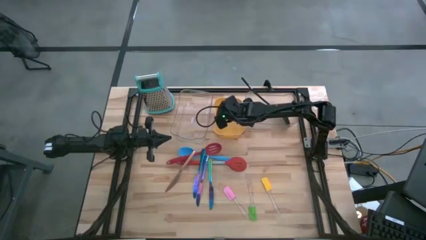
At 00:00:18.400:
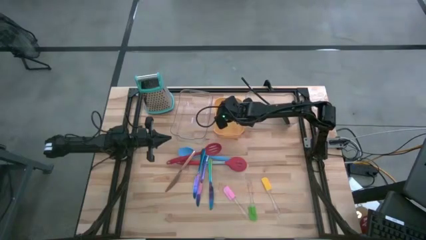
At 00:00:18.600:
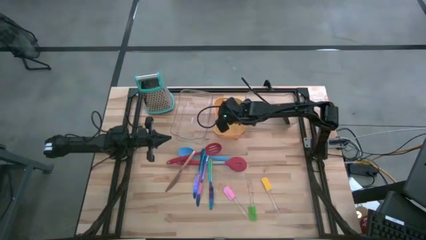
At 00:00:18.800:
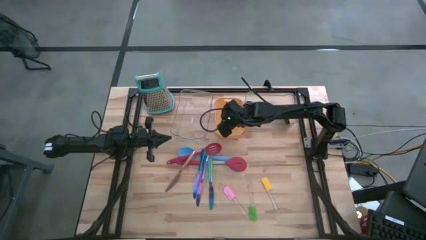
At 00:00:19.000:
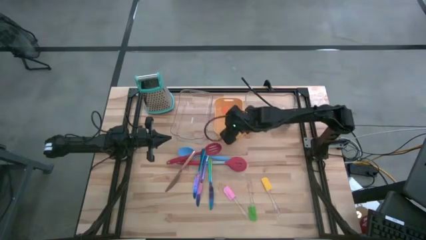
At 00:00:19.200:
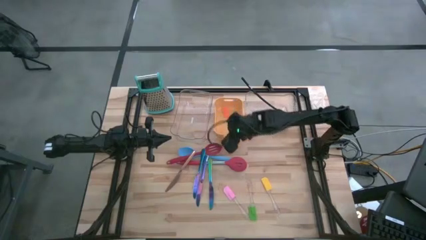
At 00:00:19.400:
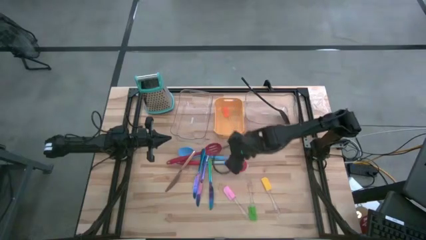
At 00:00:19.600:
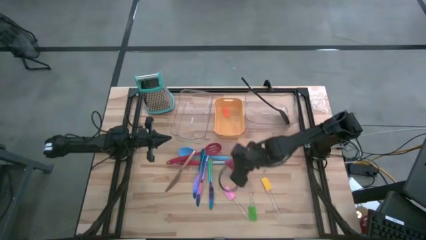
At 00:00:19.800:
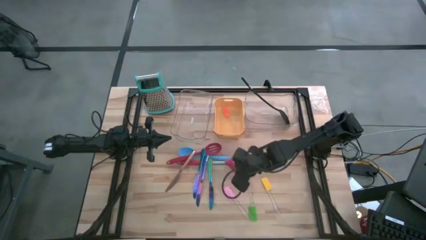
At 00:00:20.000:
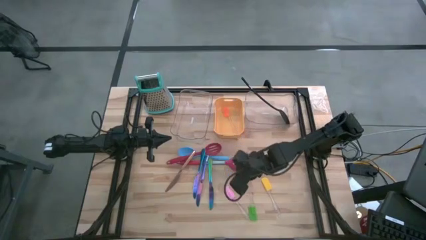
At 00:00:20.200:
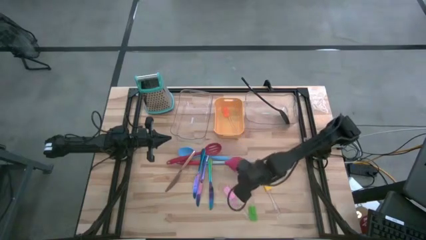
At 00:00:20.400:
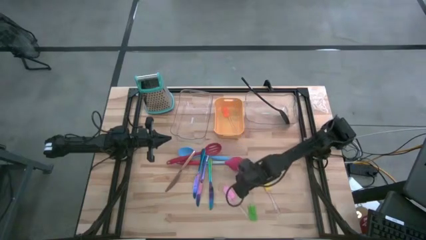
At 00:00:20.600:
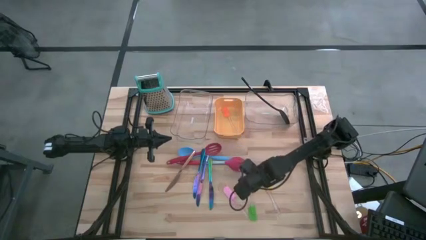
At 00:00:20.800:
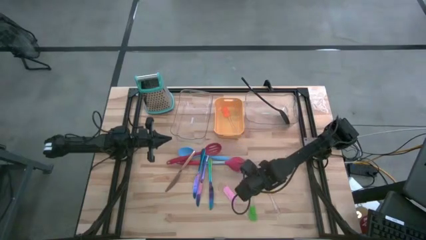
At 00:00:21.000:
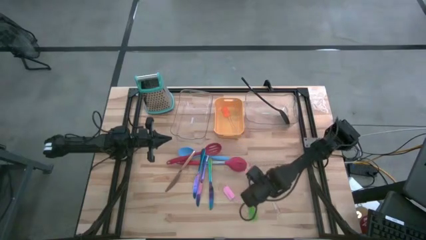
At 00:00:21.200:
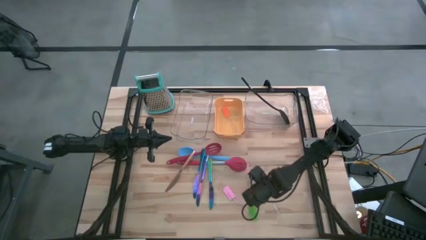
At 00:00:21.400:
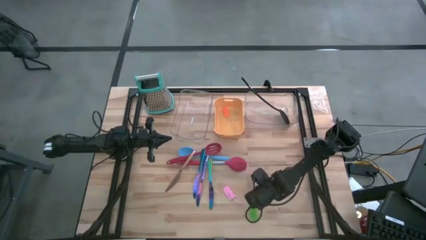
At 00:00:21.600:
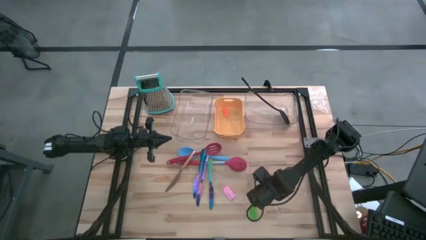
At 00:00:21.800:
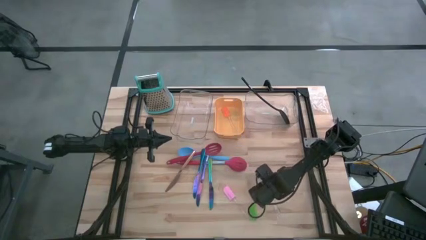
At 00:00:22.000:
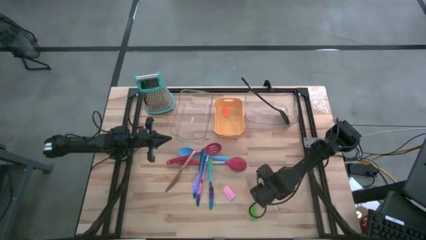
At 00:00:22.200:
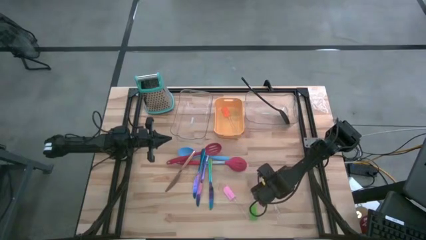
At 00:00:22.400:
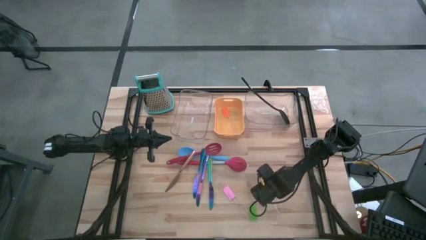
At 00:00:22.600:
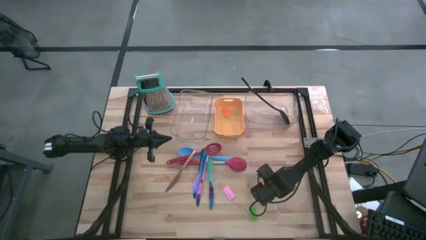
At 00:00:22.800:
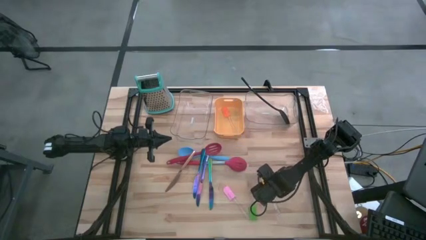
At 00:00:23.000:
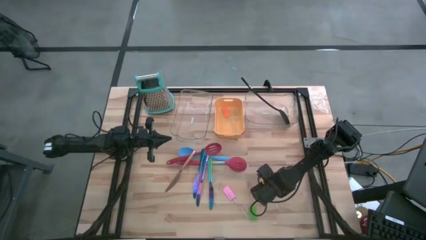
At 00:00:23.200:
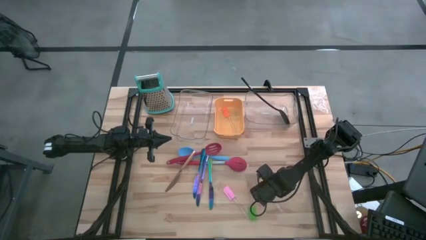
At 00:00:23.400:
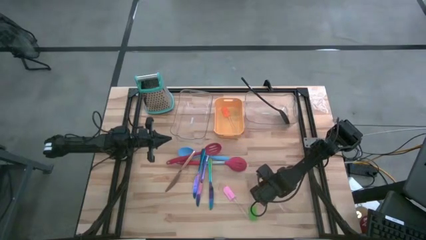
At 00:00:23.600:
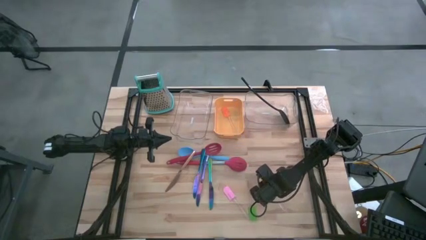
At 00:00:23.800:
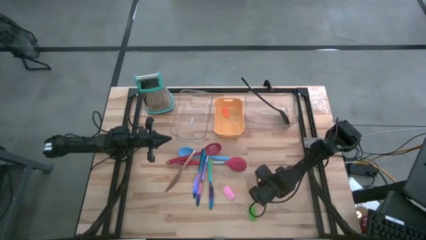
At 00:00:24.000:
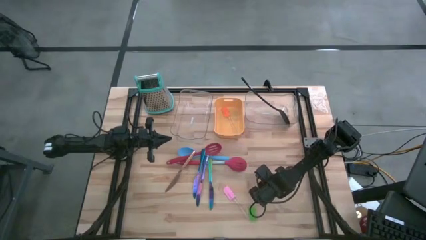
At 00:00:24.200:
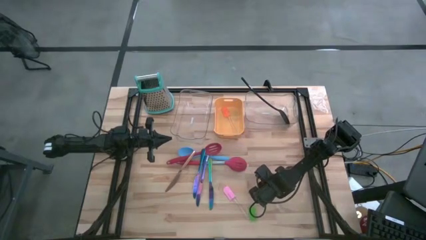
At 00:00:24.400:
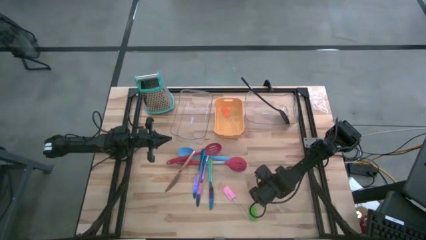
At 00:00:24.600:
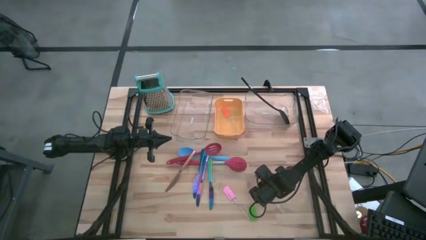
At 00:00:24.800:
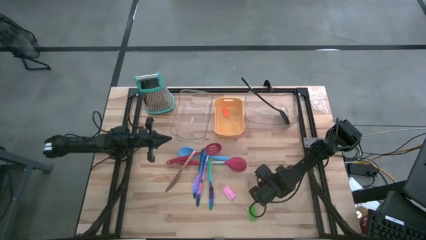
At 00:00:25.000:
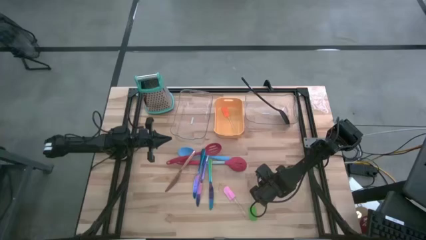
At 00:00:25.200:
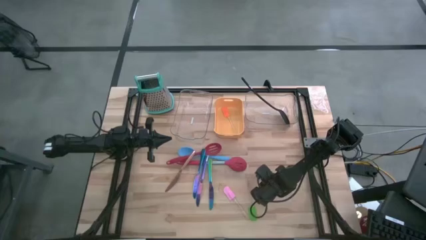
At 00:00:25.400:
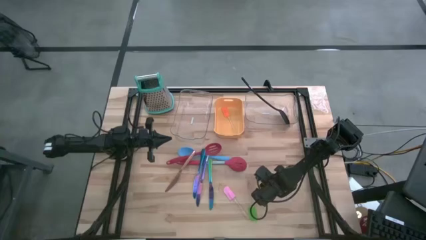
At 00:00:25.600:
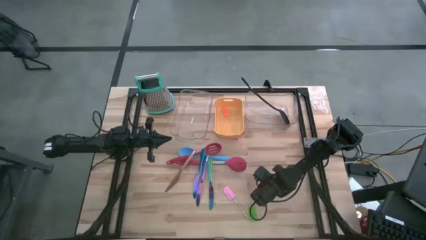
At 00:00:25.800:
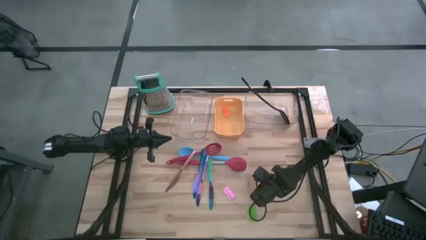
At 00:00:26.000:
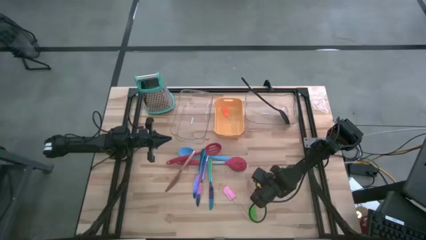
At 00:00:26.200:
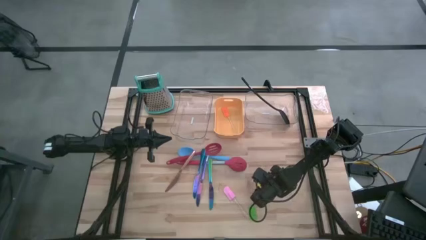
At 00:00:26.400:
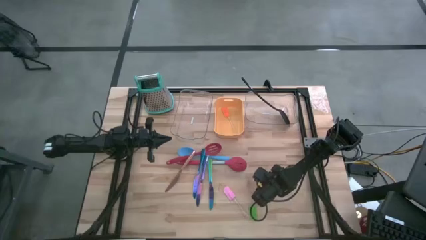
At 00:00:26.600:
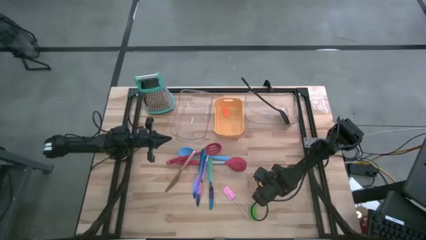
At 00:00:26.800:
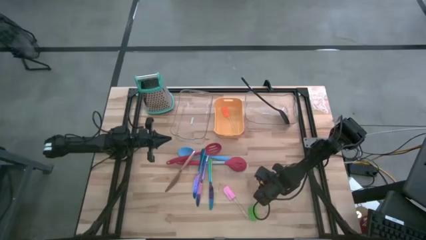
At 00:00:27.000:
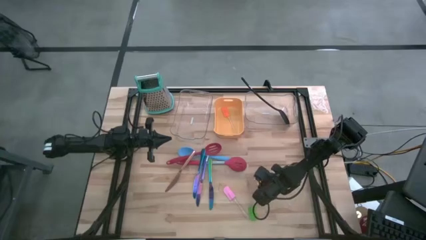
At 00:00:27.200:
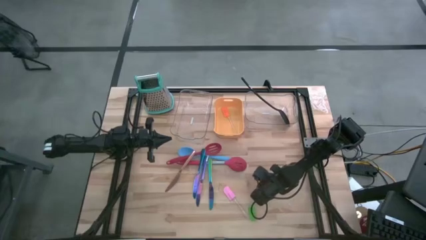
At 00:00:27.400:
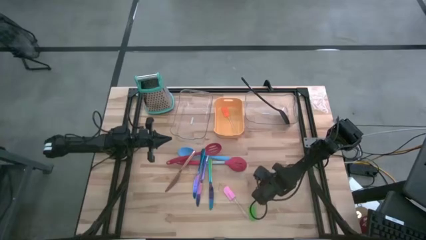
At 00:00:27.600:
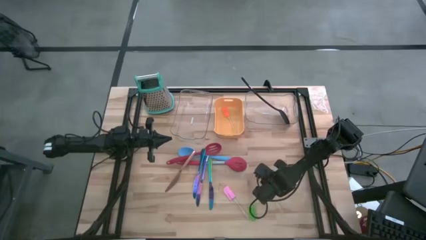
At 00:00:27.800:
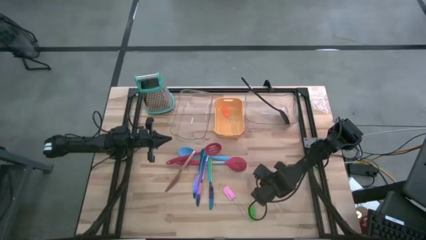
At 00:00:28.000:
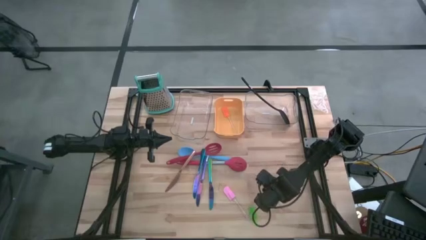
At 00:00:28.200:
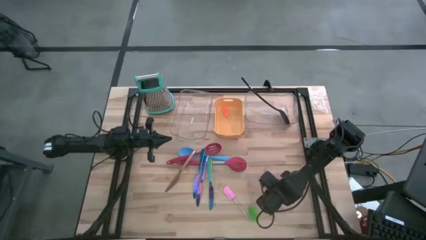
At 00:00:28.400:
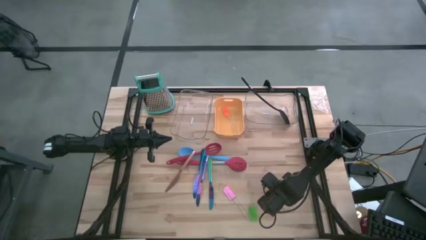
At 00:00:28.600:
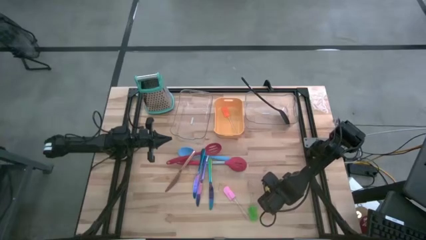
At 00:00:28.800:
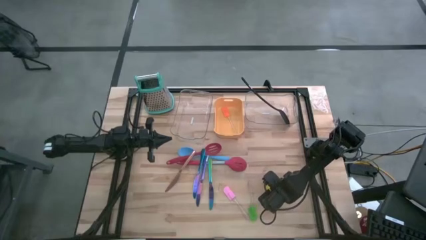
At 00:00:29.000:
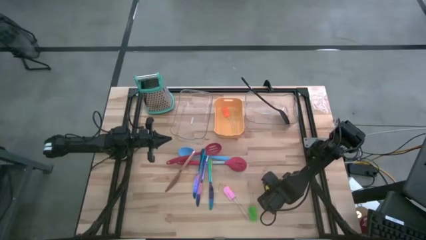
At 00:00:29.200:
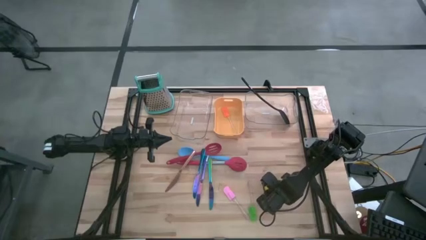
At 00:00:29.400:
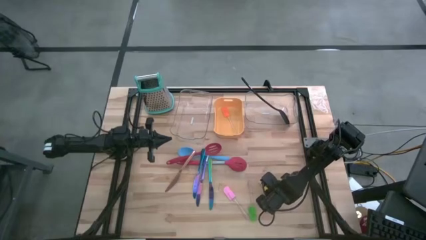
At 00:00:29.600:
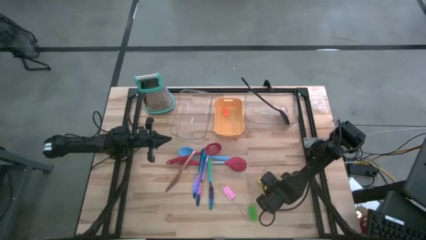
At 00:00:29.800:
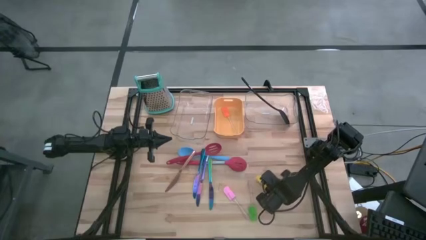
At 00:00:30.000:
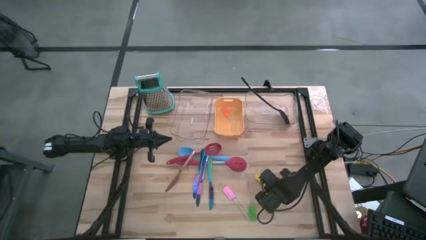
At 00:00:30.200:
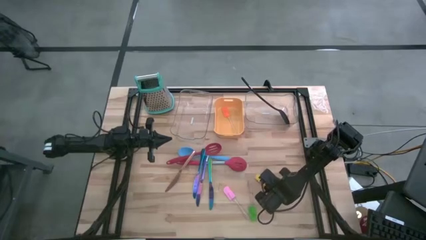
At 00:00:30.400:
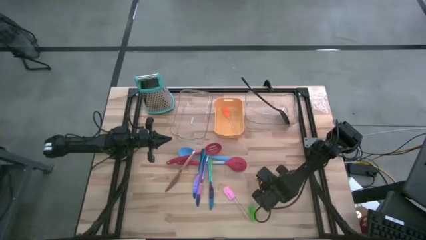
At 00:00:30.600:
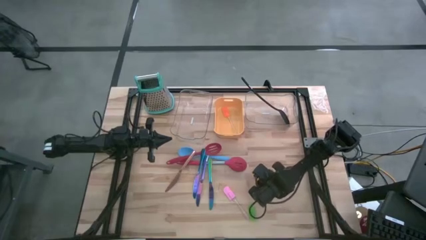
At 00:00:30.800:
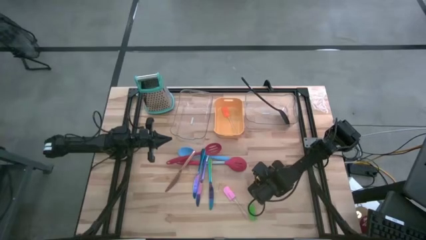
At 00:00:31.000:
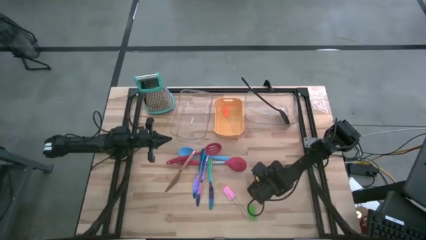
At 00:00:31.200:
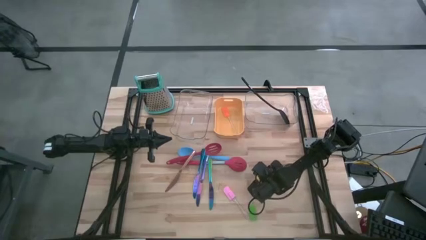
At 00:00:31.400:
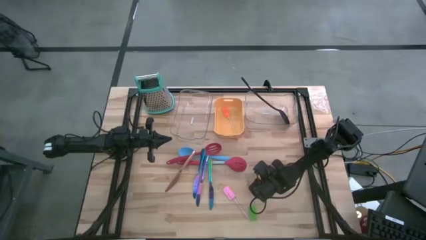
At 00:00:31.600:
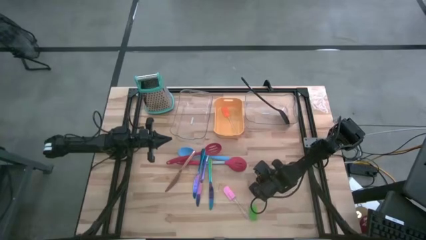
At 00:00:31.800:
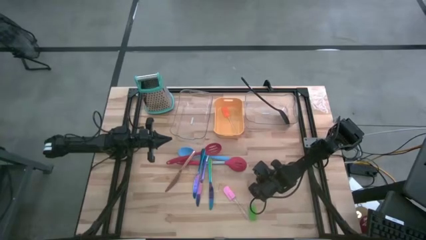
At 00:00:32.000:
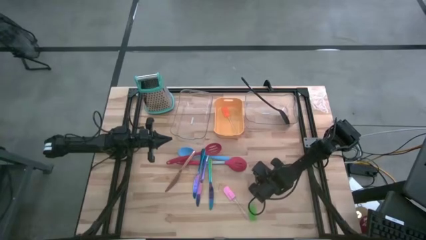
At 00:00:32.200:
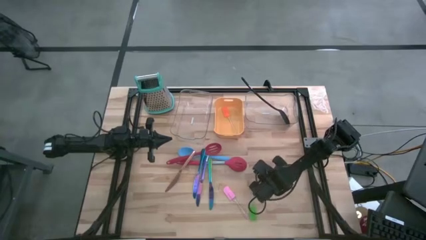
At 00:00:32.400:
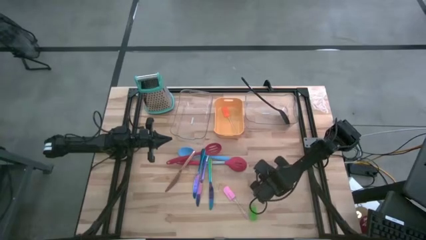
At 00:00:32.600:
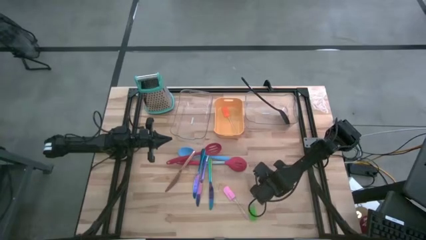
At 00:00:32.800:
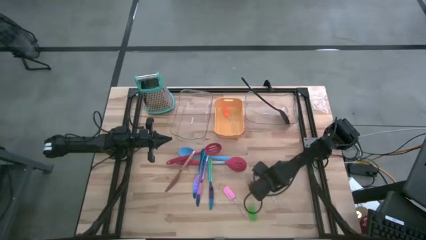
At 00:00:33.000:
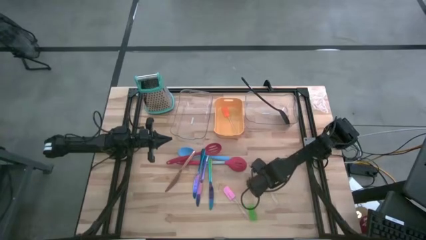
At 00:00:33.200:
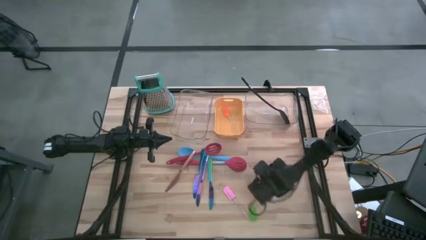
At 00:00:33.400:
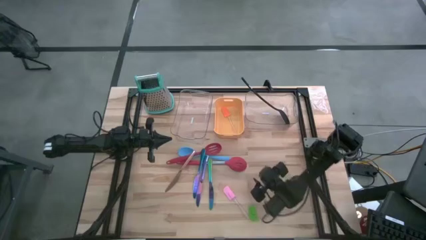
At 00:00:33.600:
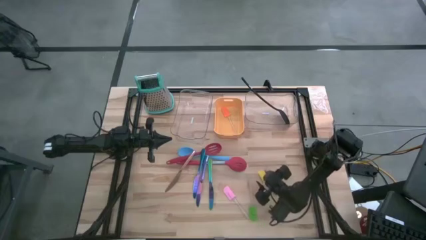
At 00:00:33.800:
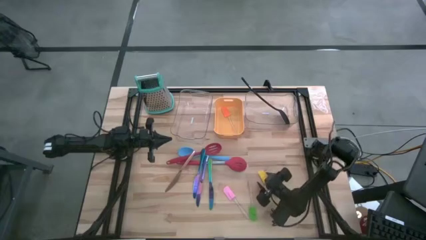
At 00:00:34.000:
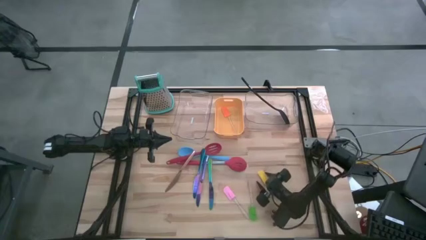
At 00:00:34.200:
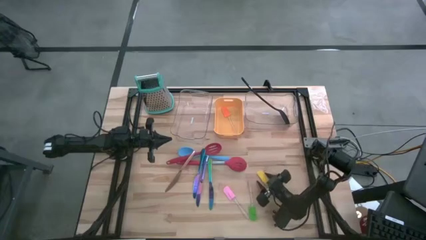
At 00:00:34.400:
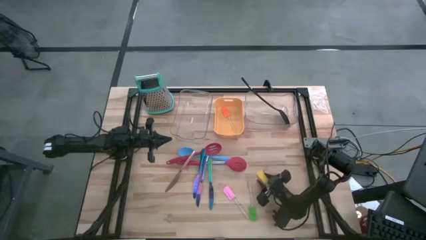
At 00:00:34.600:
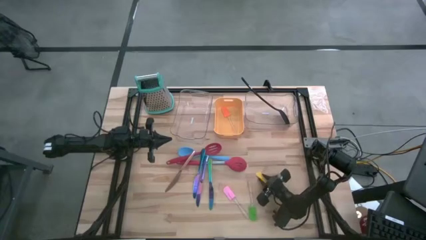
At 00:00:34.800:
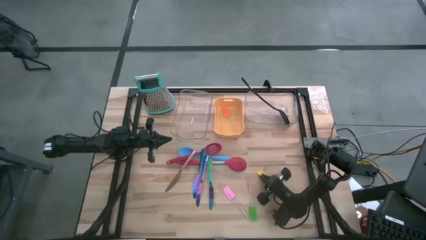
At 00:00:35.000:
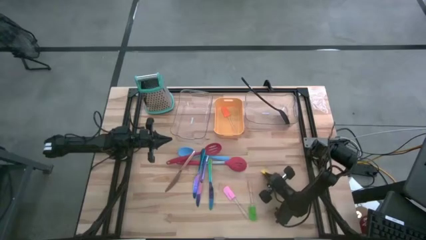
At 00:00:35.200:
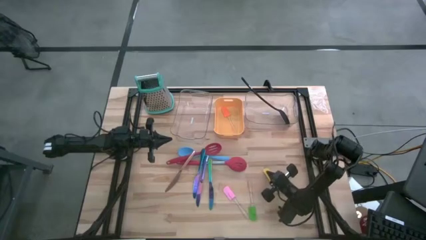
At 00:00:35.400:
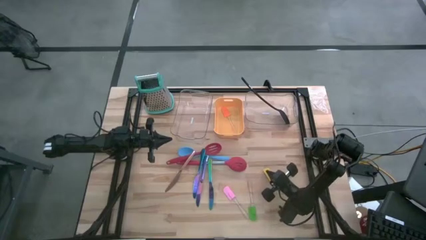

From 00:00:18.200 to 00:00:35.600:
Task: Pick & Place Kitchen Items
Put the yellow spatula into the orange bin
